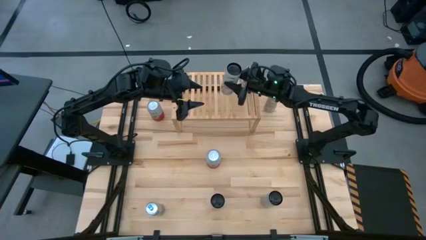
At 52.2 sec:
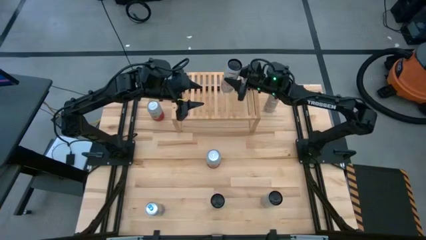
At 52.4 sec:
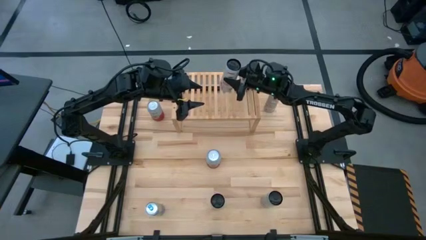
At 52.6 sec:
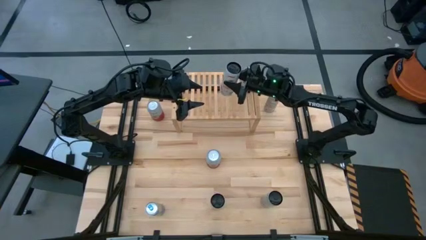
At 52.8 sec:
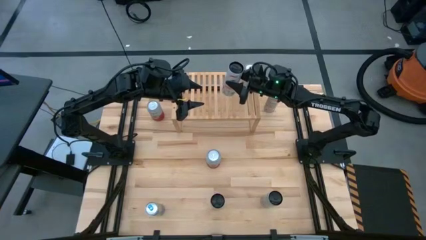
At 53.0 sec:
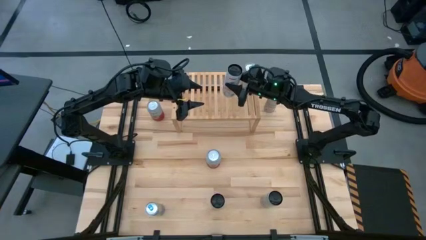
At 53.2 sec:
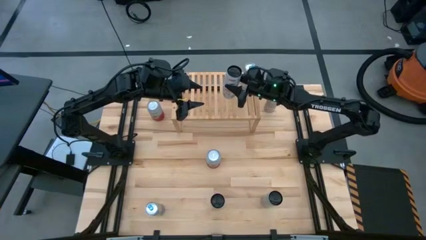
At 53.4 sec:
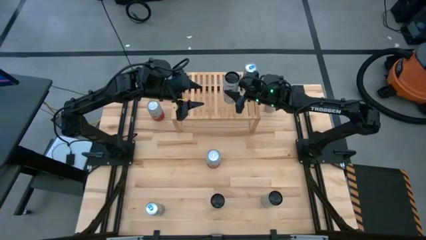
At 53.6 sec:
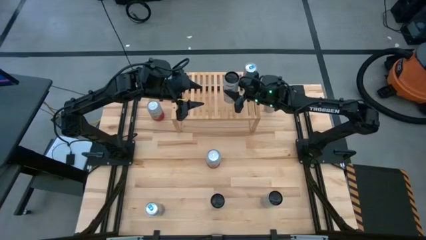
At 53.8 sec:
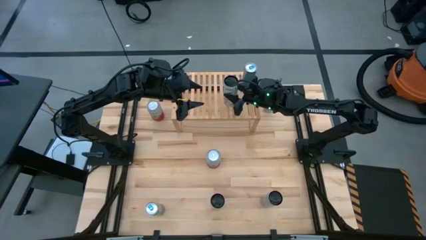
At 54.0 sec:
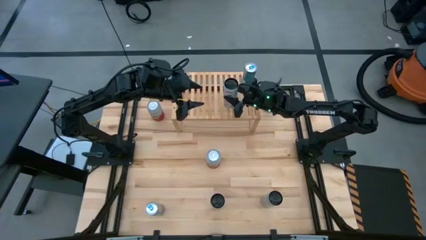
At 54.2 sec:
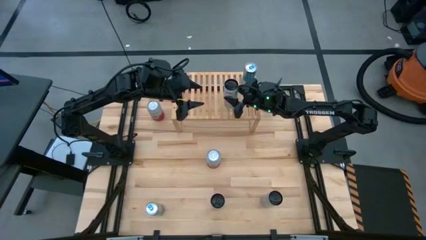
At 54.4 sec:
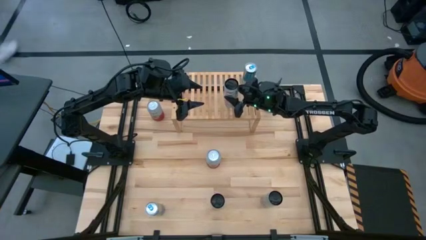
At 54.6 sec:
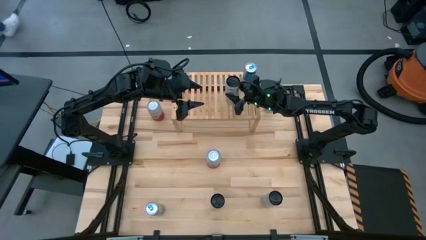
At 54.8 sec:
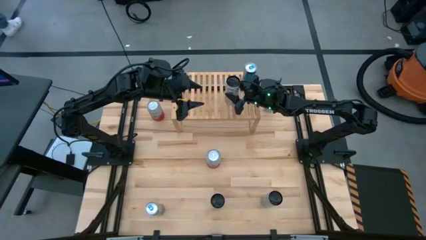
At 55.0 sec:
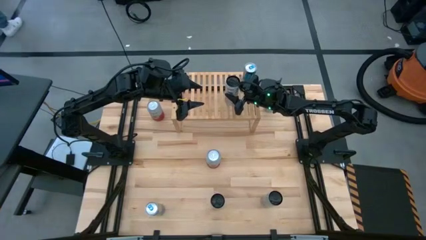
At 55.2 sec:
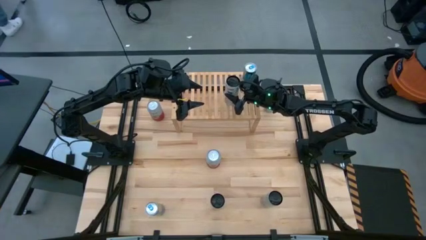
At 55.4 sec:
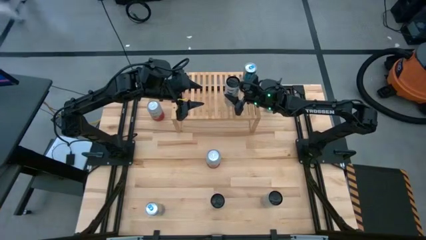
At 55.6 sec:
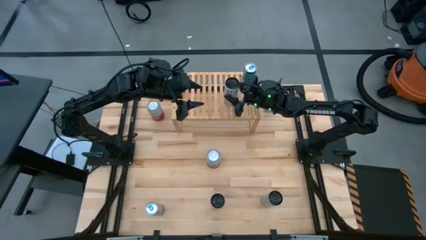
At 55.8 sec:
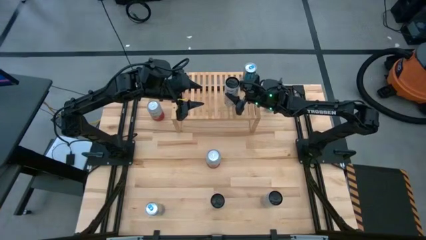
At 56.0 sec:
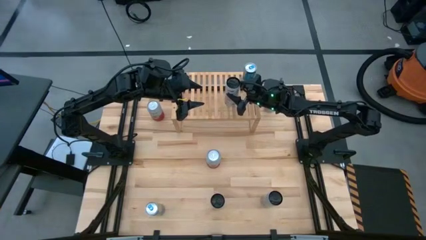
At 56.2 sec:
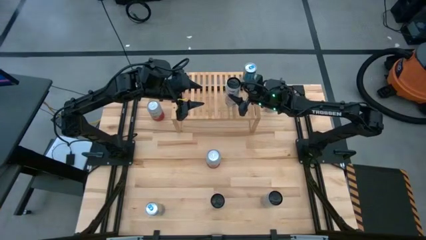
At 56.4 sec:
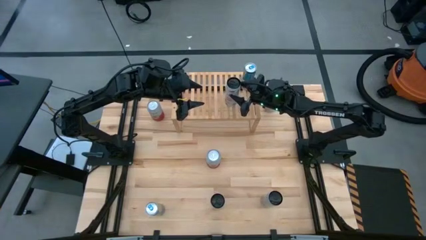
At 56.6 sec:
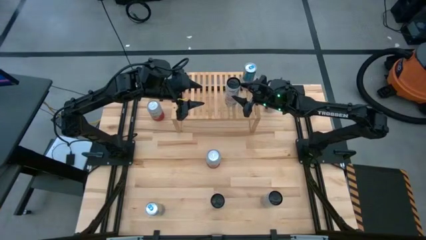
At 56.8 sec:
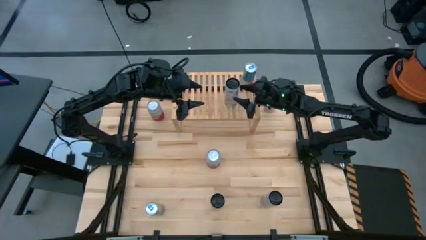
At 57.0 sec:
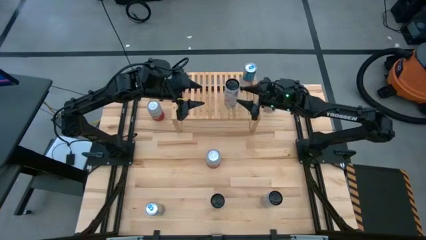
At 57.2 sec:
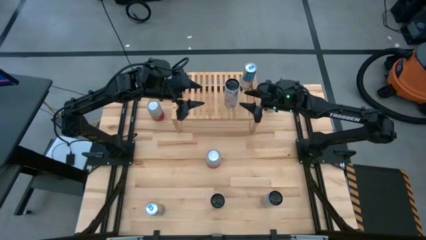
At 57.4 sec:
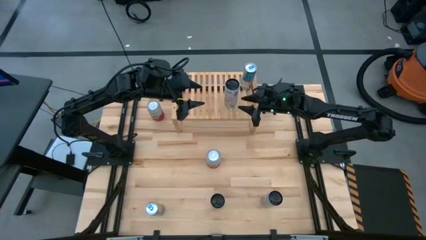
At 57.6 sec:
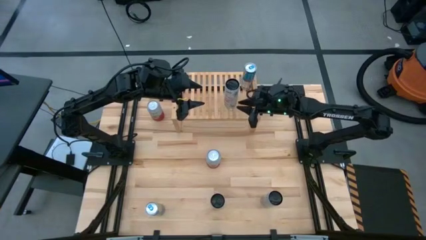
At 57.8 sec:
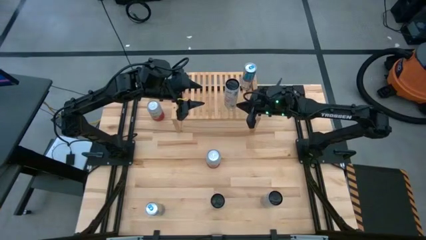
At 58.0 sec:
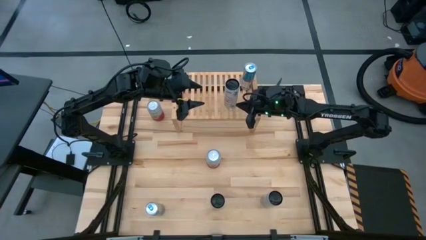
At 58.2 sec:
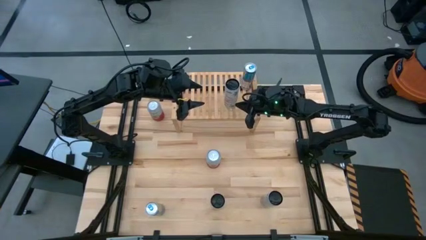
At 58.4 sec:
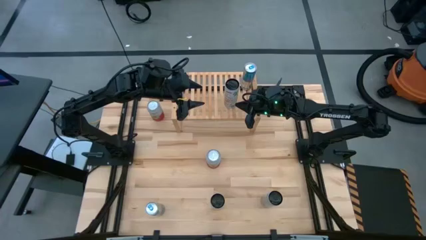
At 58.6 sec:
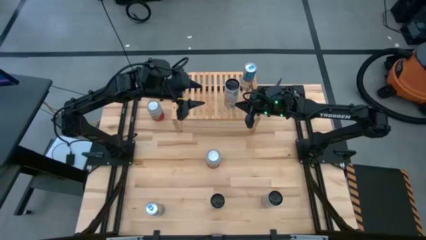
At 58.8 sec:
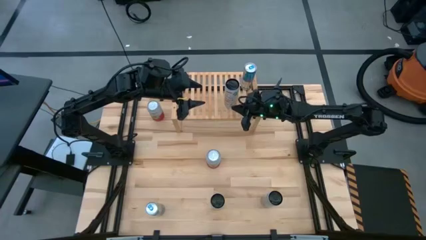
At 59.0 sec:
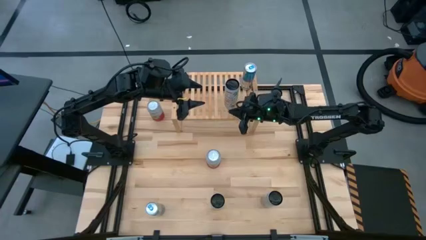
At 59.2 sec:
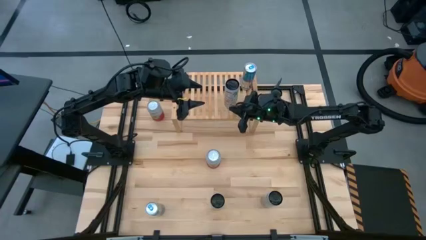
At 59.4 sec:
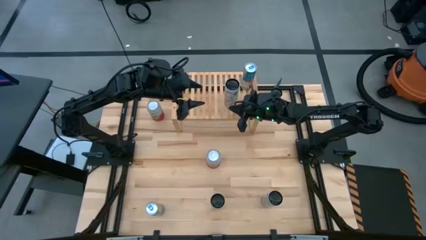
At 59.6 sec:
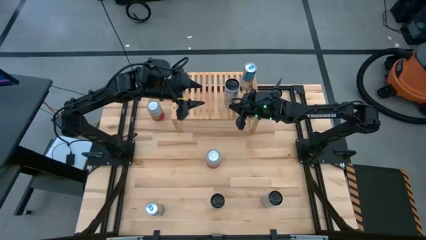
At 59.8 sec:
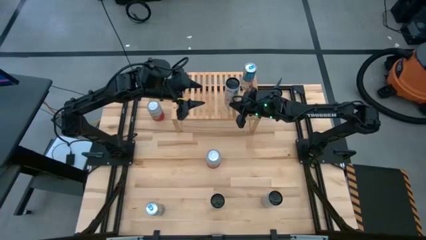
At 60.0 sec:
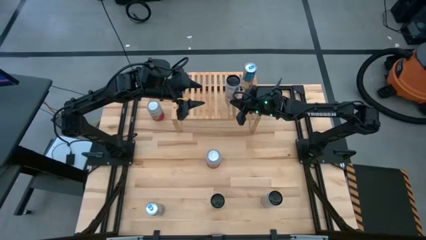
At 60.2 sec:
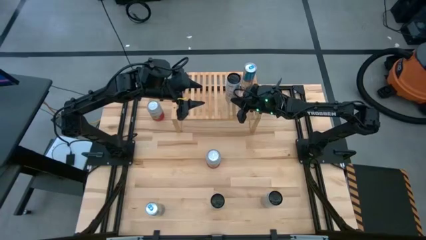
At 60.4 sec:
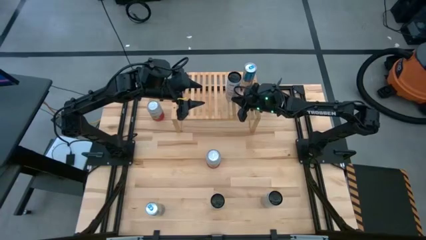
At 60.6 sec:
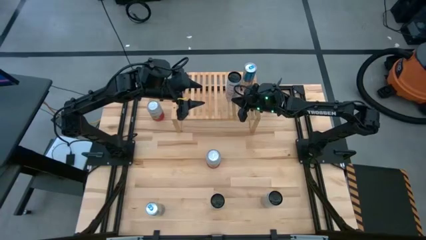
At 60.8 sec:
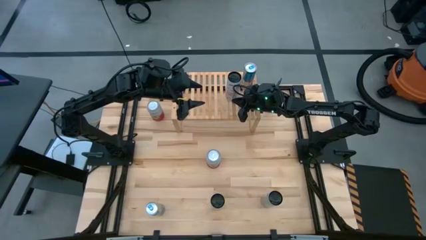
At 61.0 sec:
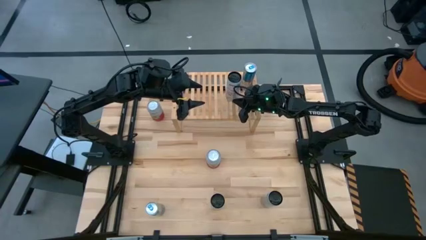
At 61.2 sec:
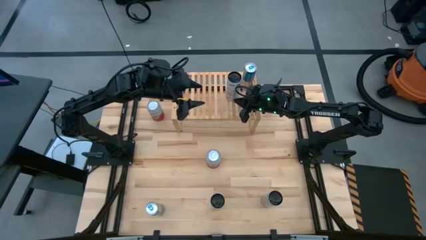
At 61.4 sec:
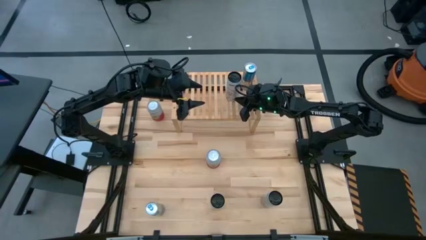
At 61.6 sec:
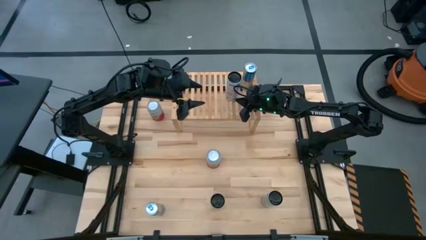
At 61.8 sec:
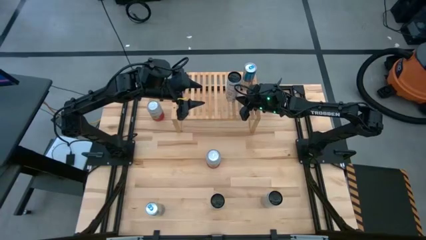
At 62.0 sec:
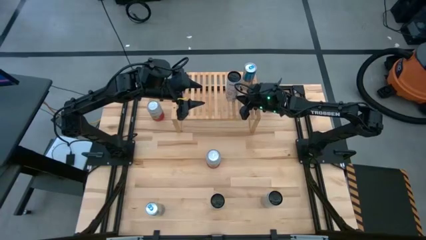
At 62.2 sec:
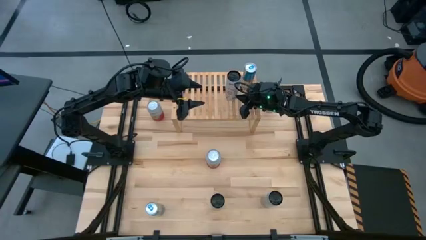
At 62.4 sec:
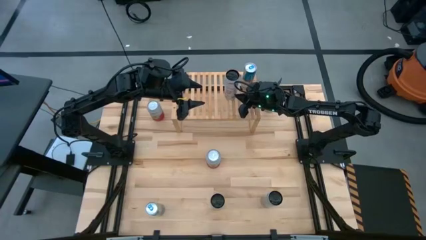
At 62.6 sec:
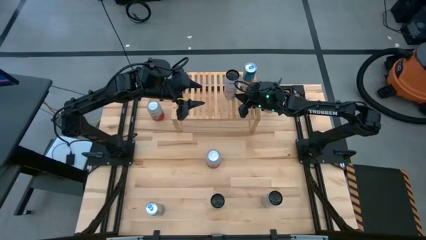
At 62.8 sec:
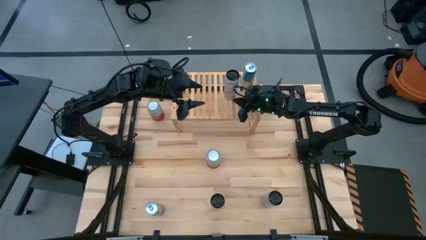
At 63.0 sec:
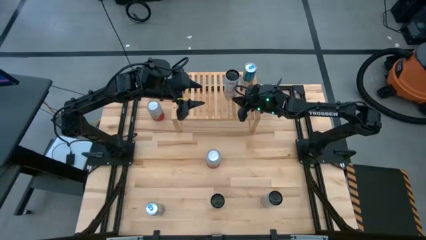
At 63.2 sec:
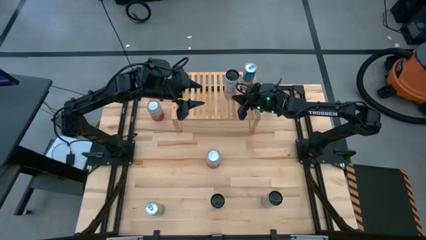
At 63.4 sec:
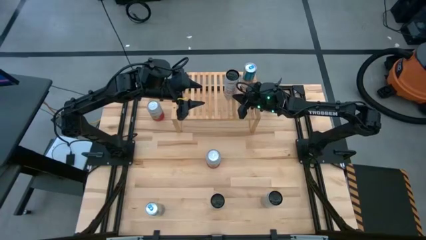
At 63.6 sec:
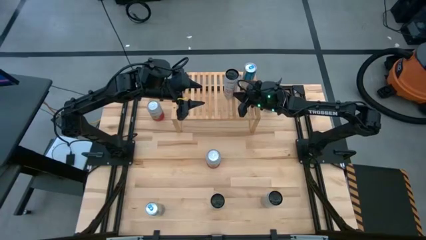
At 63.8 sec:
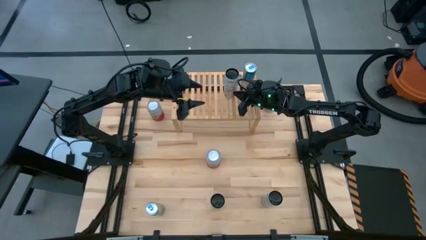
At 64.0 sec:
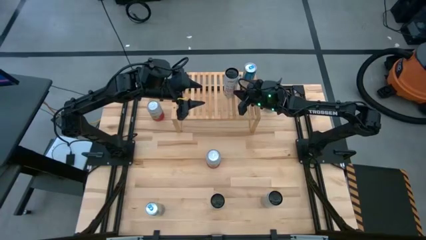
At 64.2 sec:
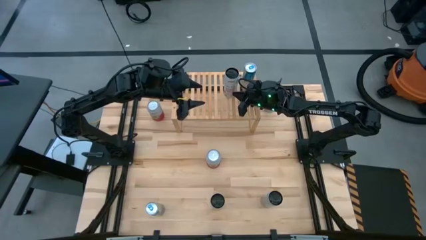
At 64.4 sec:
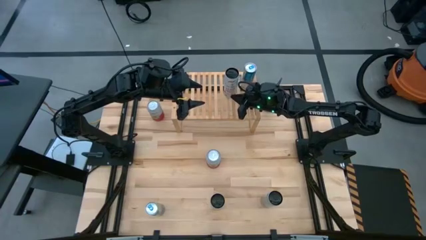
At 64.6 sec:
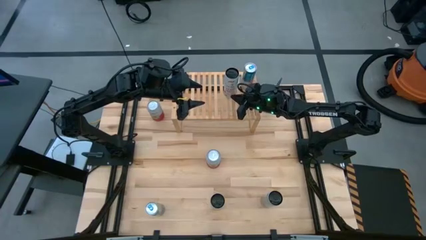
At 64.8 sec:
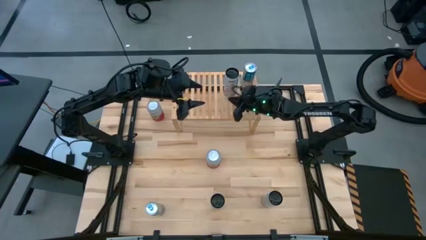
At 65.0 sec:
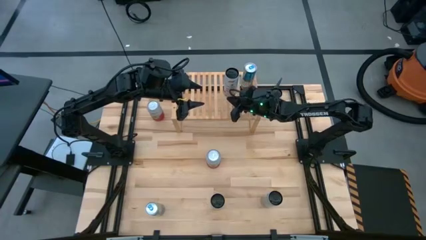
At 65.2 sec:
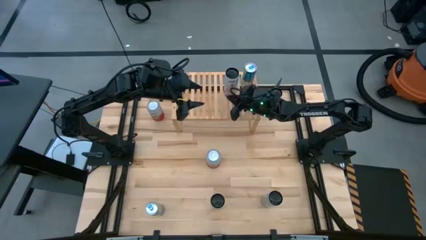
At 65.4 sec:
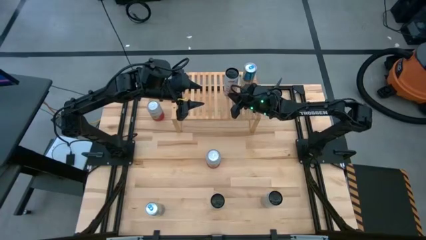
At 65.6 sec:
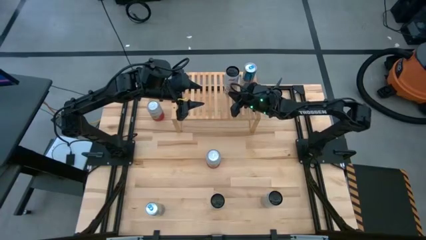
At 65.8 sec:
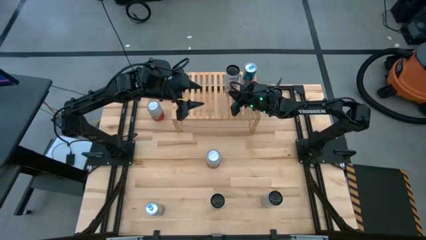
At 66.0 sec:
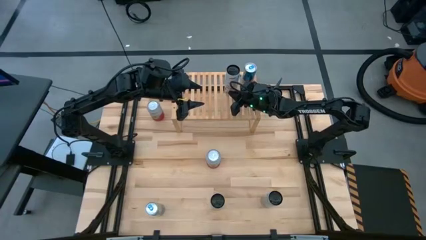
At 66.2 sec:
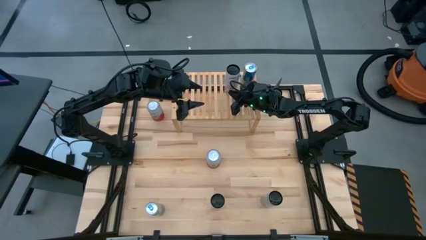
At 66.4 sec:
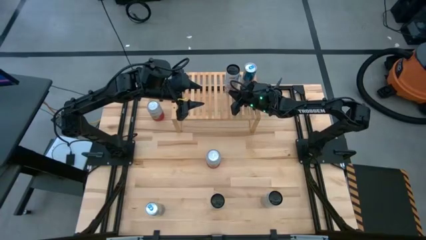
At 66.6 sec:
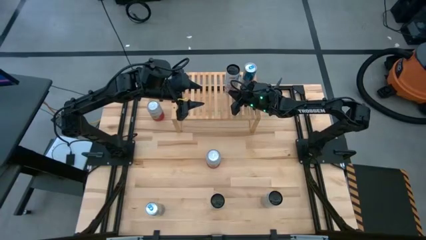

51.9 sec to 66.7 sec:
Task: Place canned beverage on shelf
Put the left white pink soda can on the shelf
